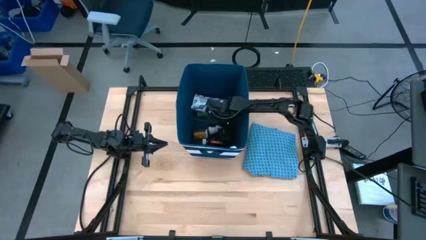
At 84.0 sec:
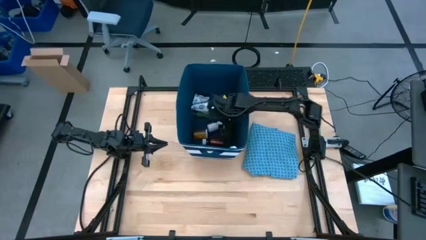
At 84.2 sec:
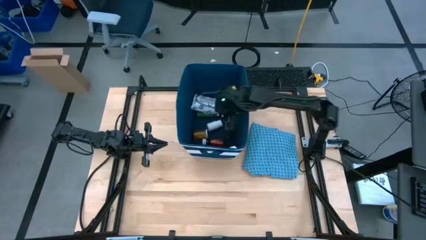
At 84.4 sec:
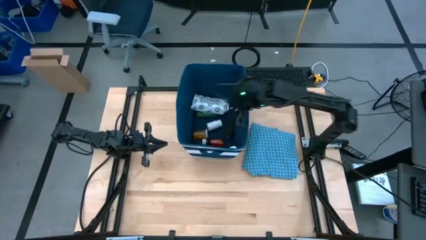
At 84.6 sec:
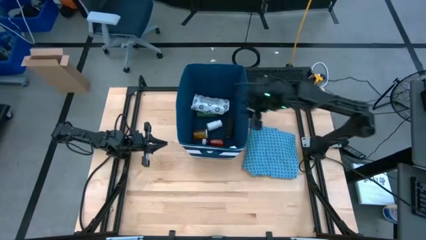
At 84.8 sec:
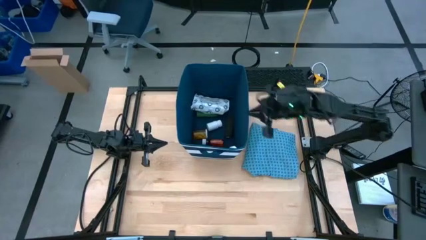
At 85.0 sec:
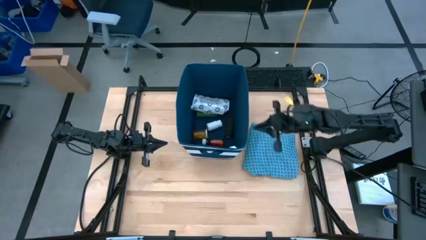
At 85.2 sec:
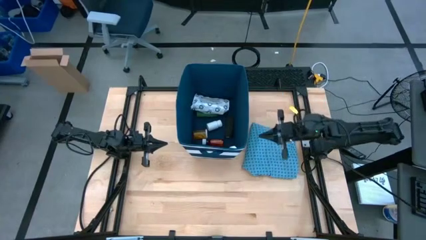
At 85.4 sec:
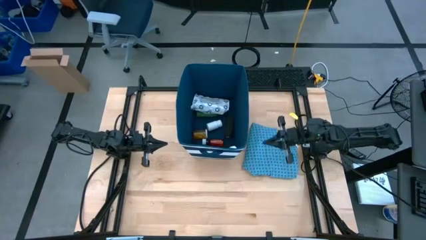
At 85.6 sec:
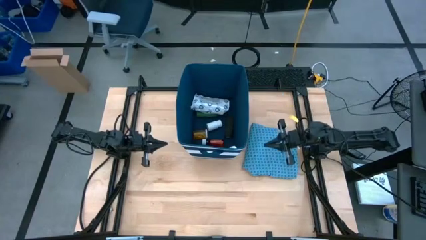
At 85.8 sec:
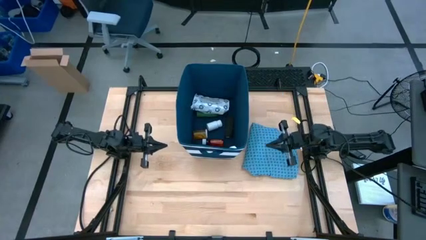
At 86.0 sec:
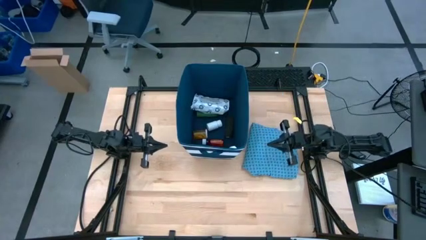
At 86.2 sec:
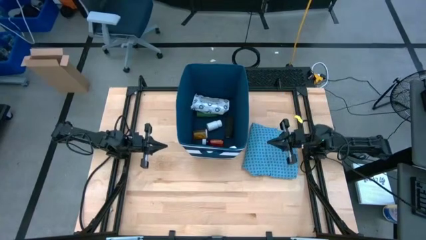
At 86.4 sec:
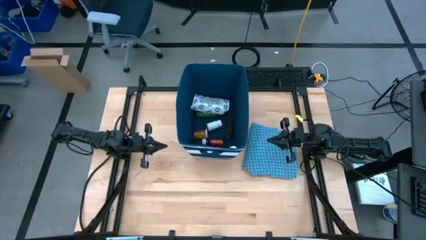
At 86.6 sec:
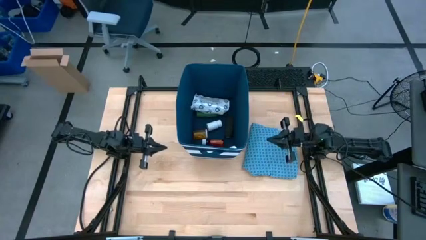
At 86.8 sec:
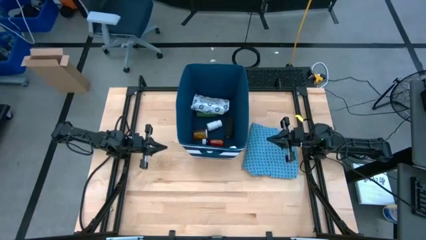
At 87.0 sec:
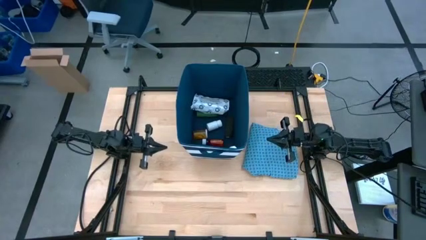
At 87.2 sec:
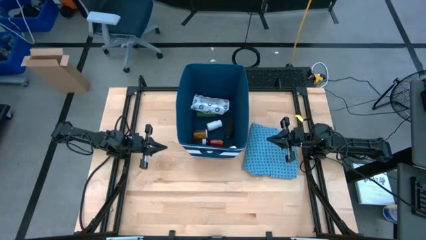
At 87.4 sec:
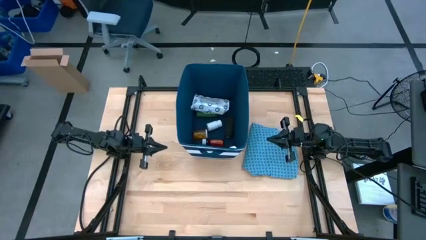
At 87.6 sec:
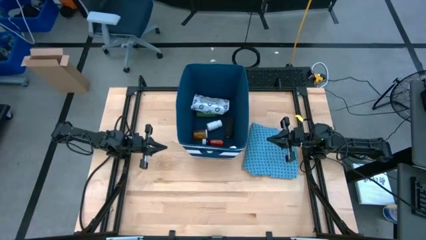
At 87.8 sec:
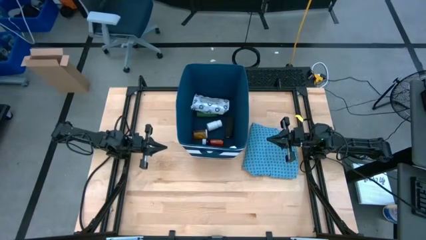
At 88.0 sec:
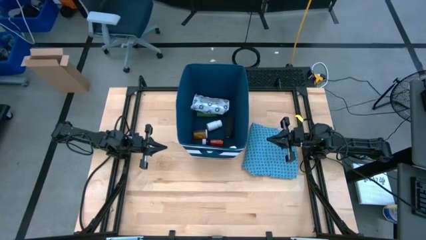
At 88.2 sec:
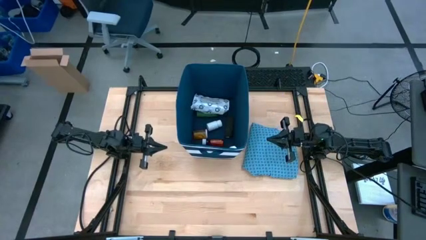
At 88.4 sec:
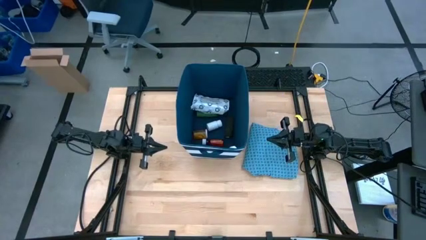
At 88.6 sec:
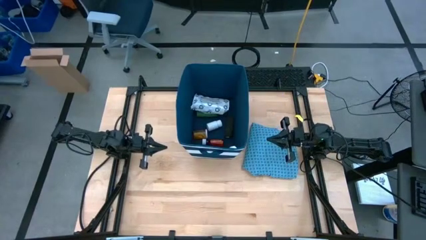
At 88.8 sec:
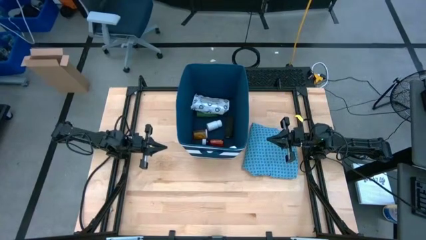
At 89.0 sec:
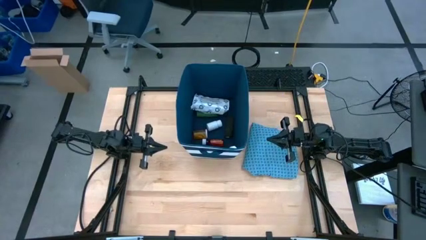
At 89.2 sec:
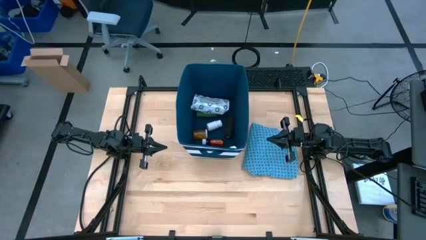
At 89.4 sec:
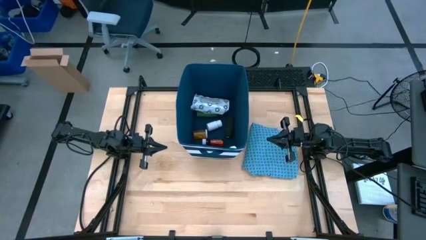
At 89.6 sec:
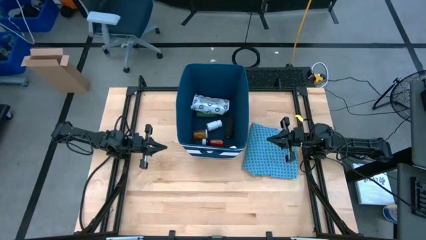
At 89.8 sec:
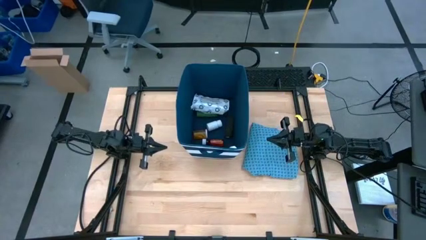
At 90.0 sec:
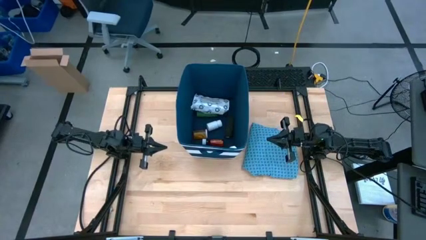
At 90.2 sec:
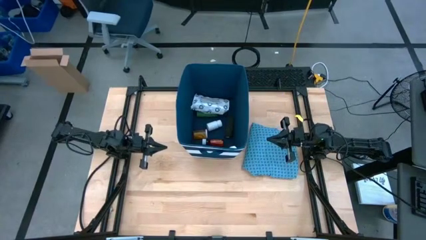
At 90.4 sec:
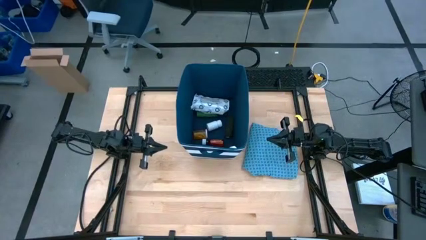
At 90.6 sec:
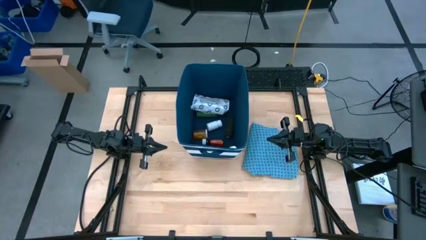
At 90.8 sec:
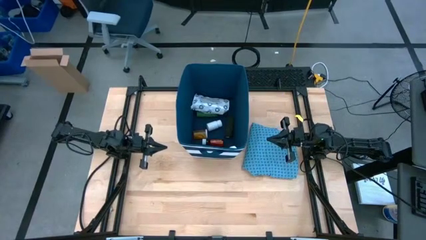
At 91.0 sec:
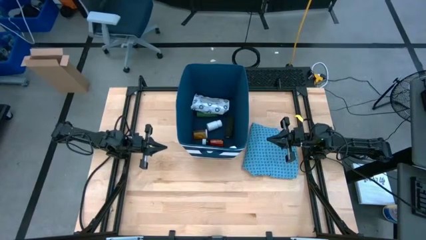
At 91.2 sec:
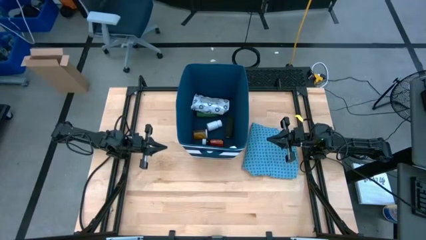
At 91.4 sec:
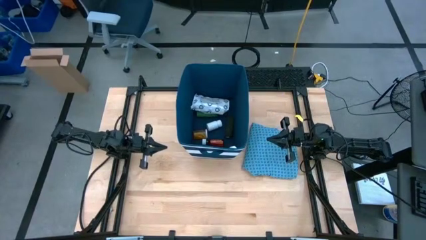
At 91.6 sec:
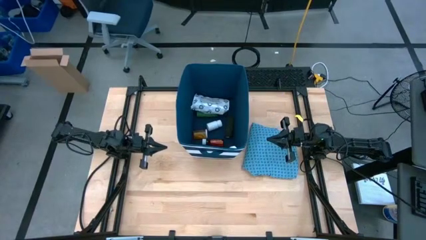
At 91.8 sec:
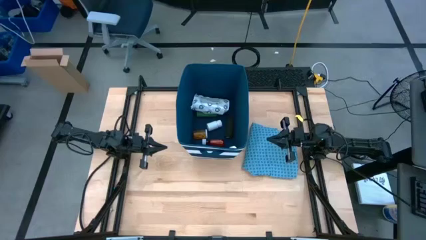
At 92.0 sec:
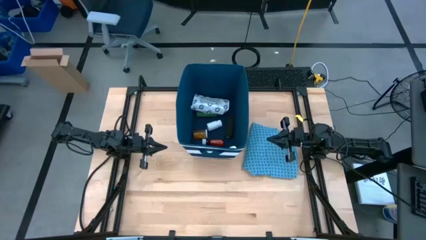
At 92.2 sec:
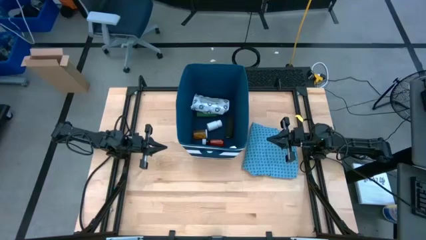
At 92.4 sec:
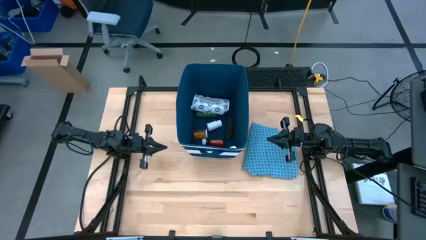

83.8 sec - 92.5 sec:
Task: Pick & place medical supplies in basket/bin
Return to Home Position

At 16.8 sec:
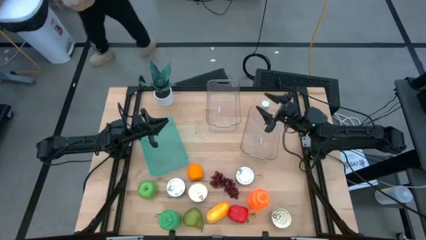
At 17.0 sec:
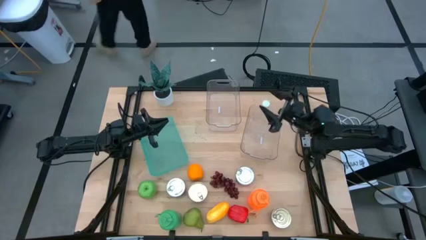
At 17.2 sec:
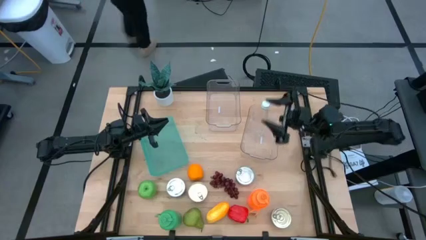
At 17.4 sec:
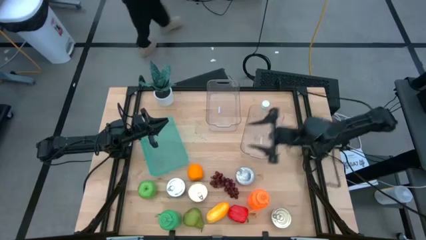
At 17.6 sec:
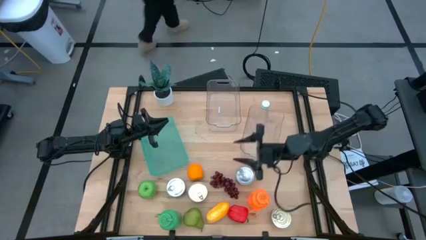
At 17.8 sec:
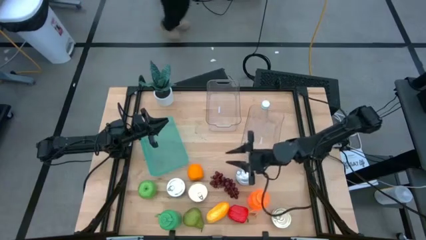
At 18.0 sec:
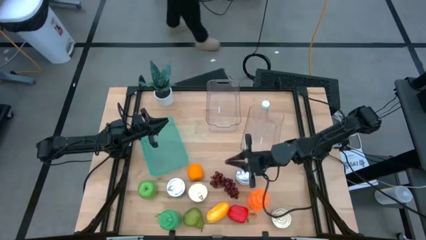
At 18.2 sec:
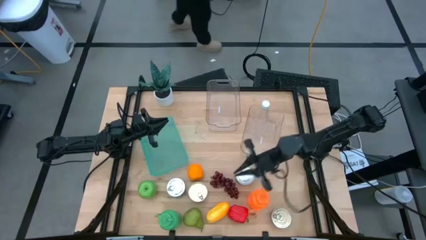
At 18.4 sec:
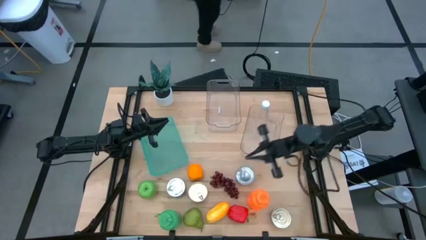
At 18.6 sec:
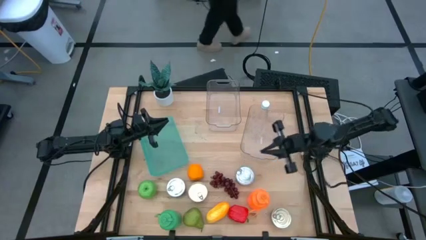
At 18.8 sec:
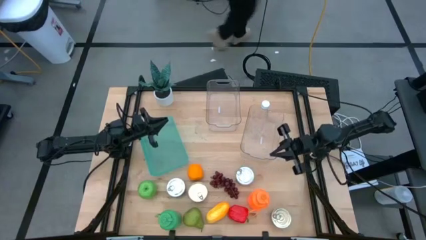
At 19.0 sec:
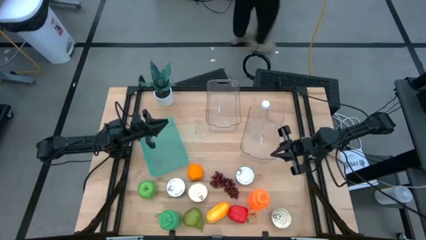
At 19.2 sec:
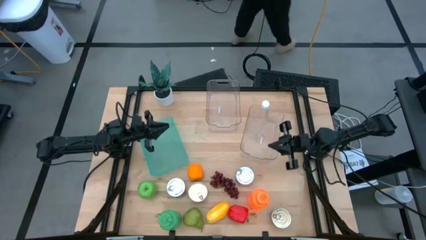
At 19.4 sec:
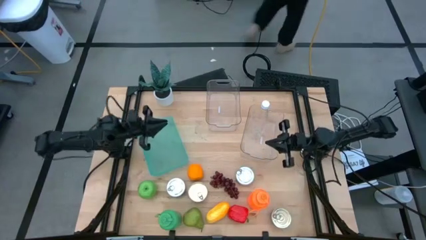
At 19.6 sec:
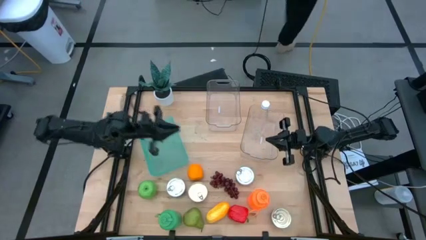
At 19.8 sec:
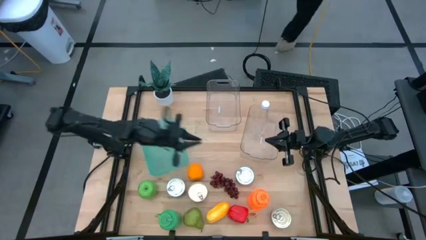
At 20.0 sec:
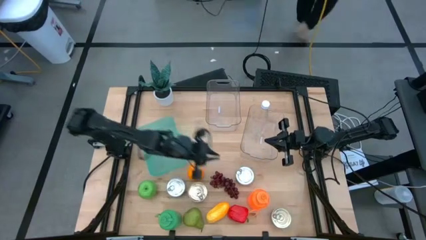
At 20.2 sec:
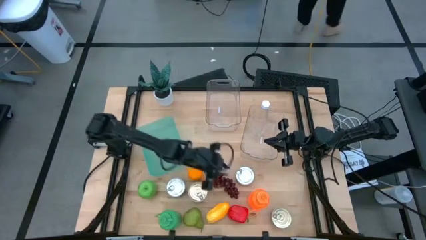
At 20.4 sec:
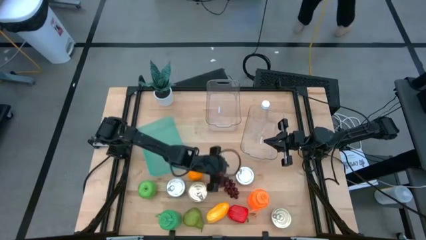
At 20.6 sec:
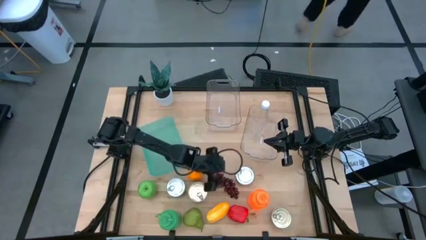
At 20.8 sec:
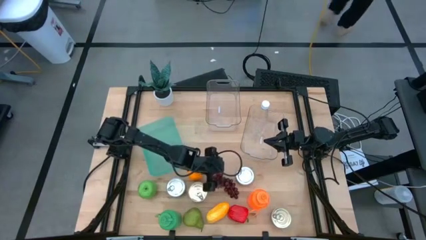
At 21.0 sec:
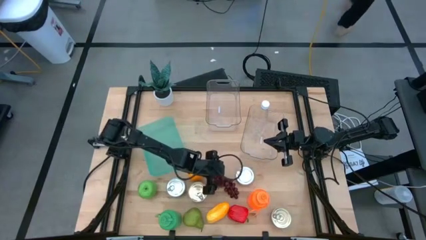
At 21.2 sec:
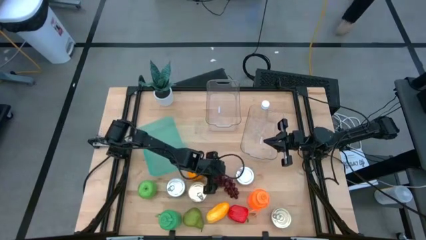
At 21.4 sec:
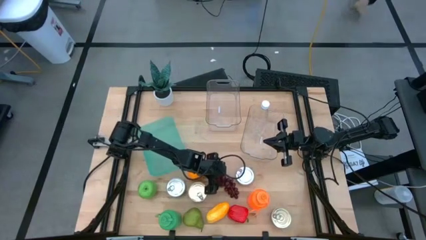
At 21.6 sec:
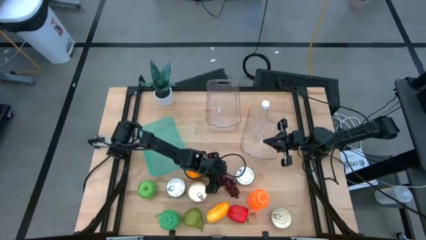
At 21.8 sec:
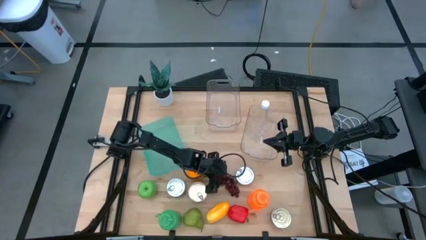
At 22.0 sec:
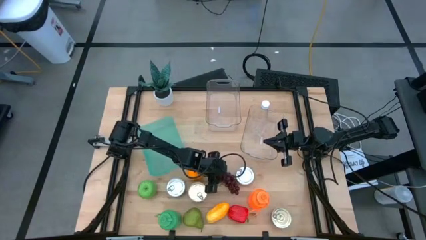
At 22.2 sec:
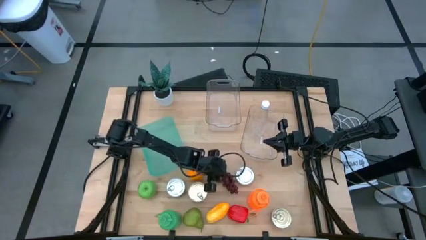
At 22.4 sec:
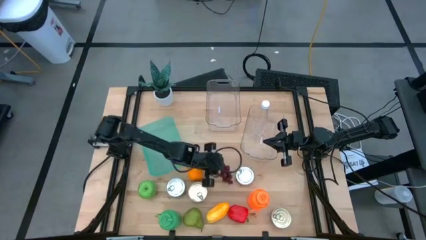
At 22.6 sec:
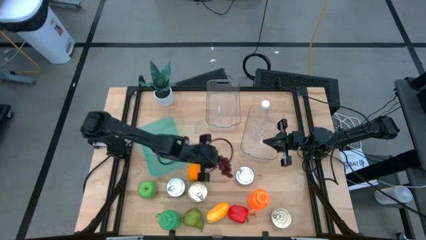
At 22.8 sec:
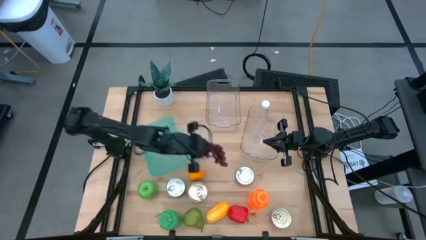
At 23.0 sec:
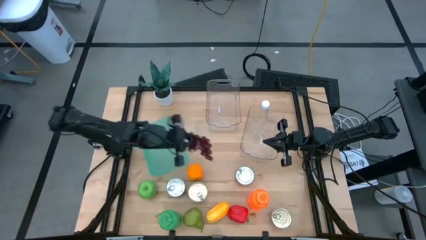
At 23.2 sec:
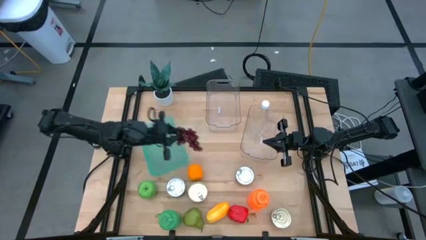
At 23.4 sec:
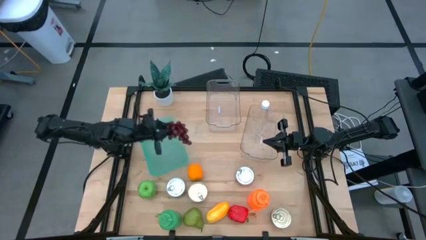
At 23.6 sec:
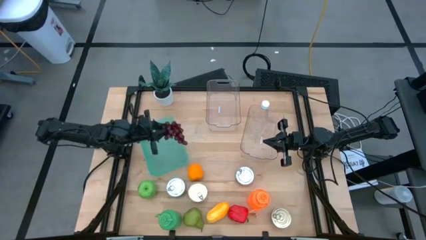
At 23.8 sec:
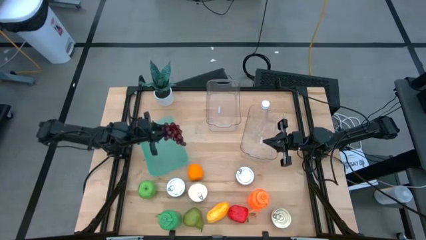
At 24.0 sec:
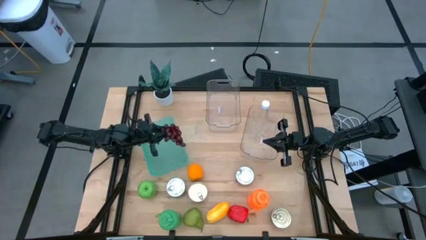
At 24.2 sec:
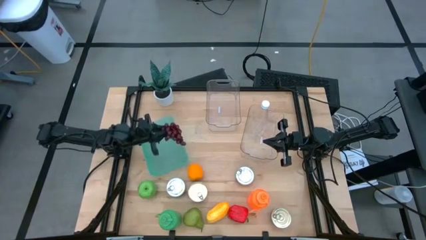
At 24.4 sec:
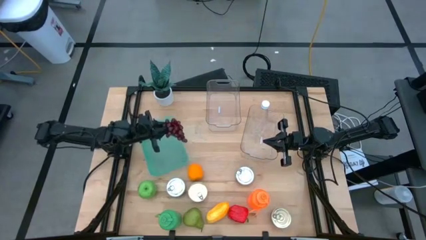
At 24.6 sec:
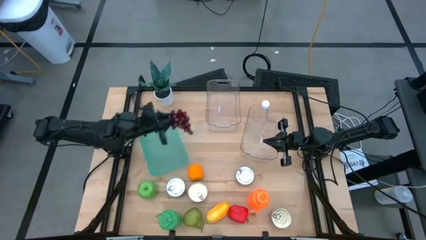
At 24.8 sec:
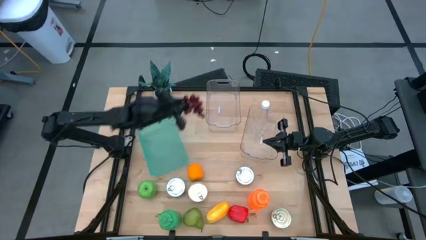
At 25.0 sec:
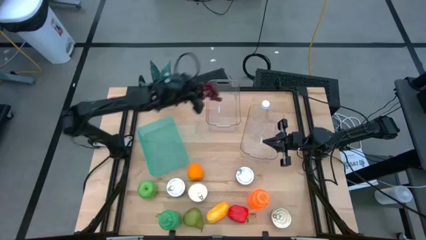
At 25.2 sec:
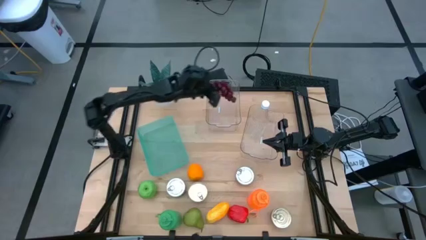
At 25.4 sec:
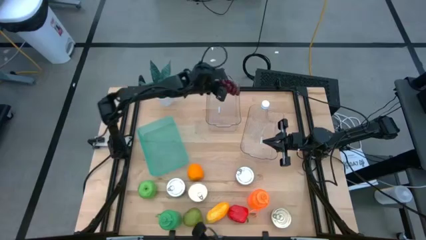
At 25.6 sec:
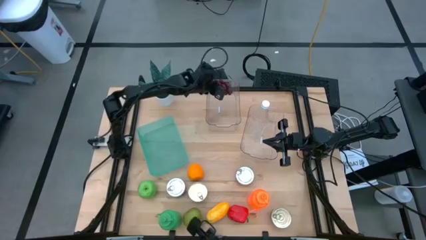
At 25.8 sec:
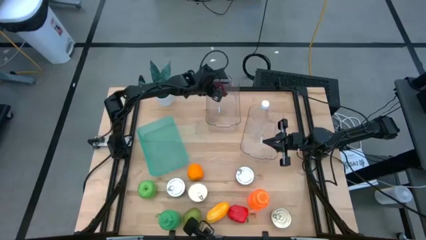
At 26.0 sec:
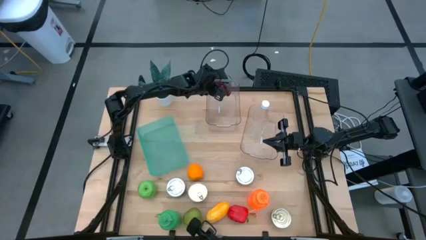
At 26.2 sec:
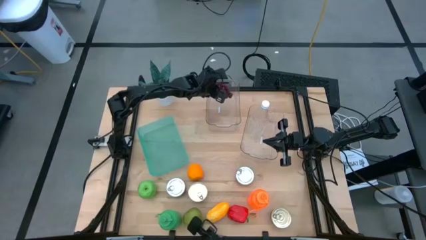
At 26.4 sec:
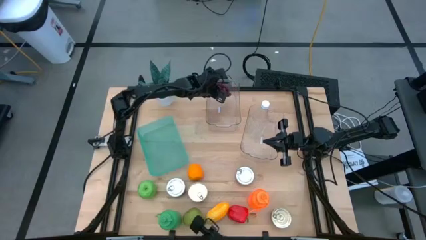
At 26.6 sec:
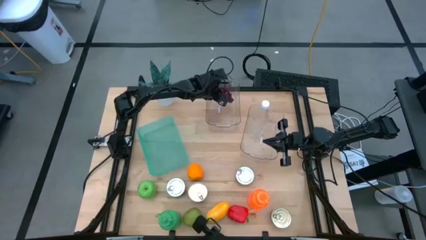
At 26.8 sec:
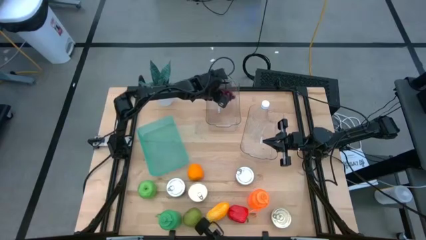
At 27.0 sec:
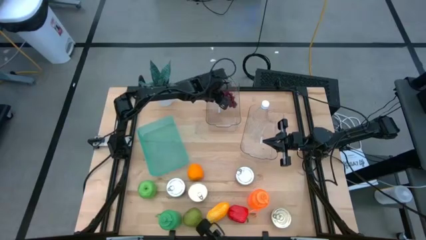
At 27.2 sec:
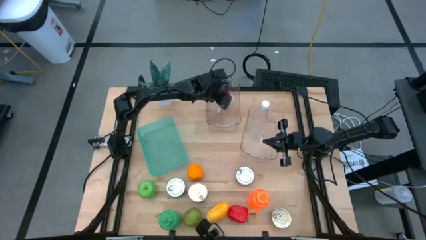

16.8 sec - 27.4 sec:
Task: Pick & Place Food Item
Put the bunch of grapes into the left transparent bin
